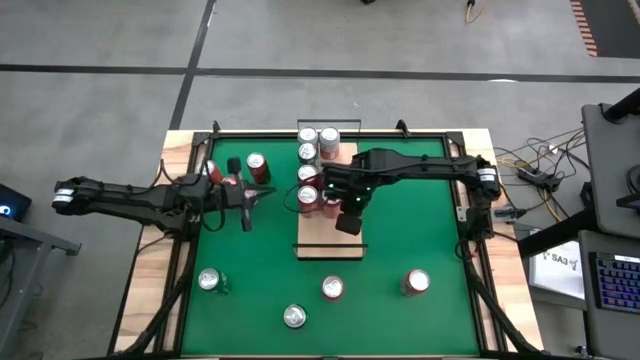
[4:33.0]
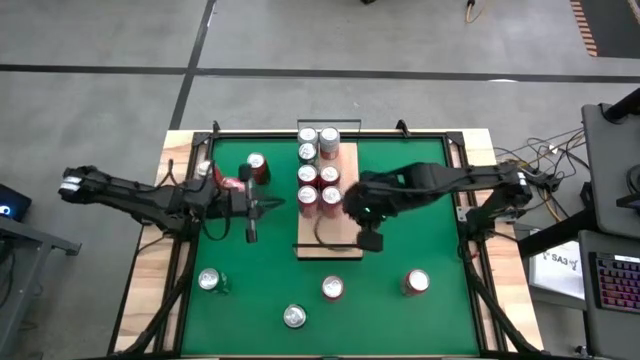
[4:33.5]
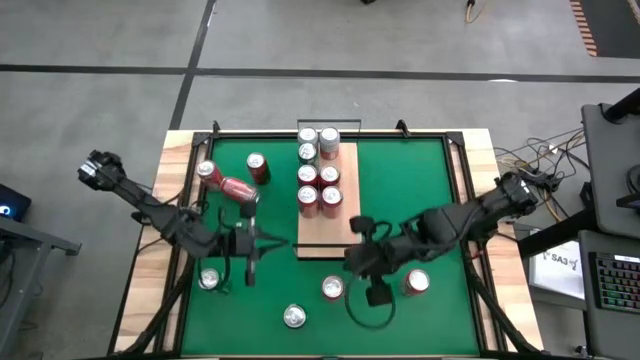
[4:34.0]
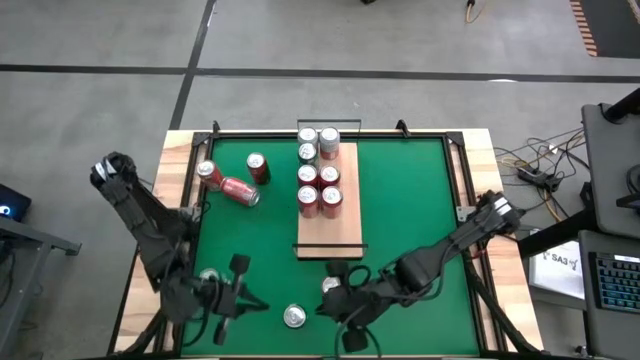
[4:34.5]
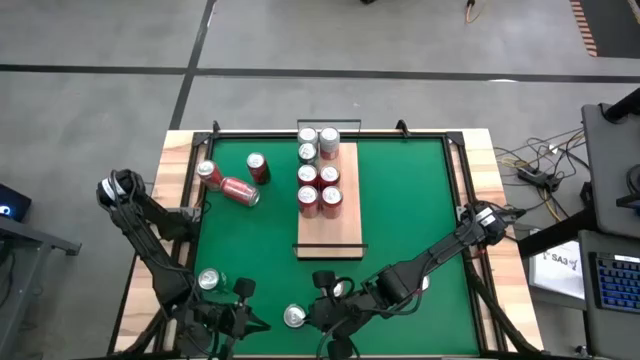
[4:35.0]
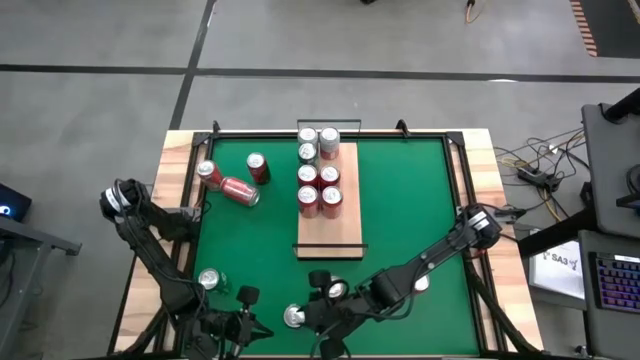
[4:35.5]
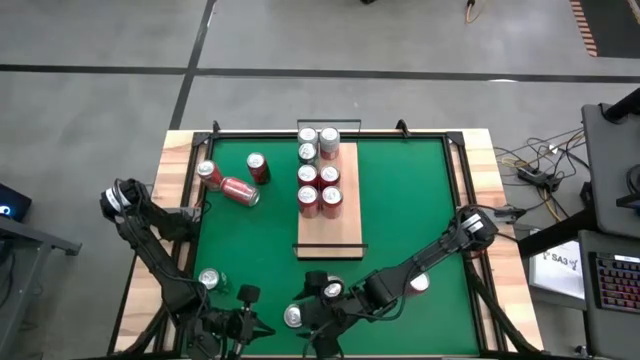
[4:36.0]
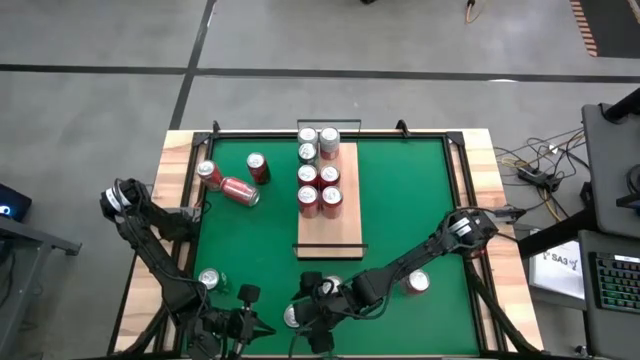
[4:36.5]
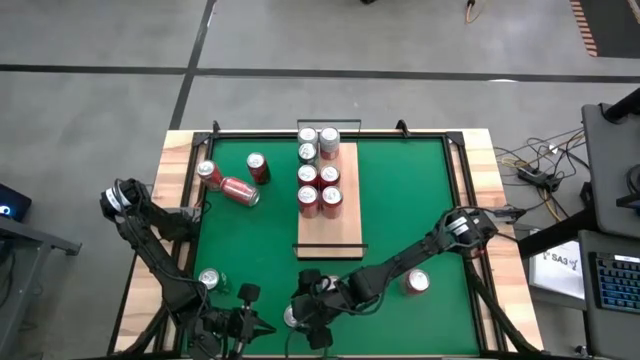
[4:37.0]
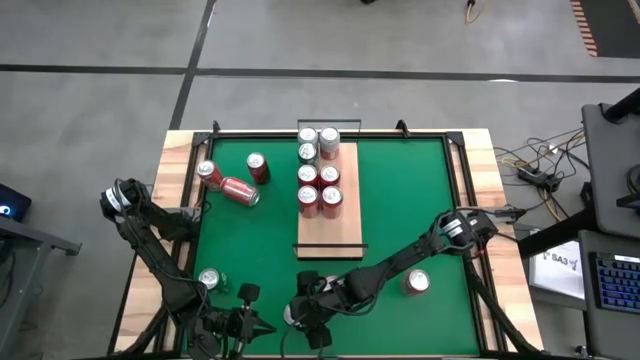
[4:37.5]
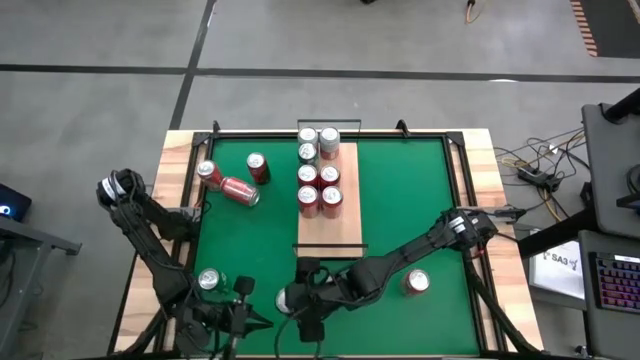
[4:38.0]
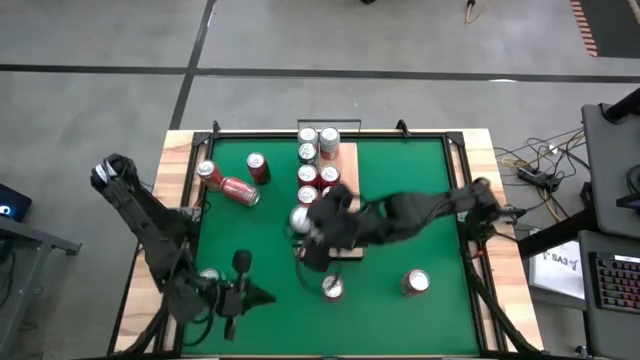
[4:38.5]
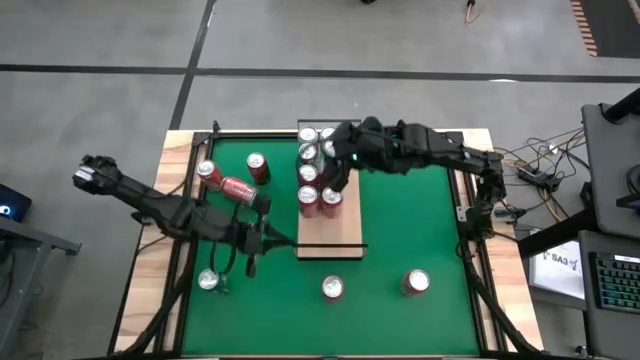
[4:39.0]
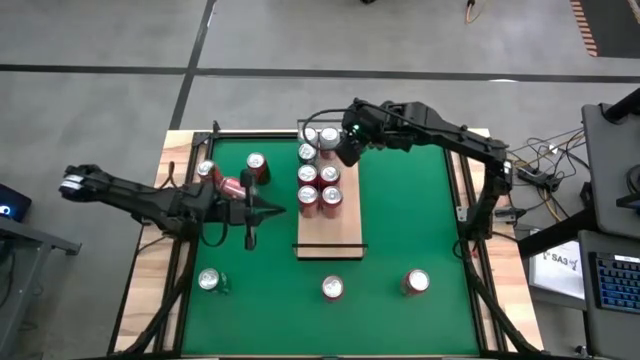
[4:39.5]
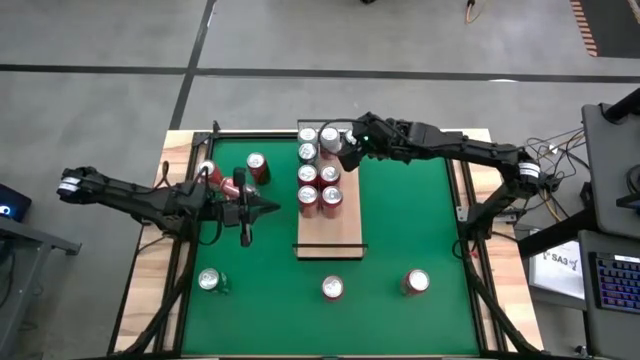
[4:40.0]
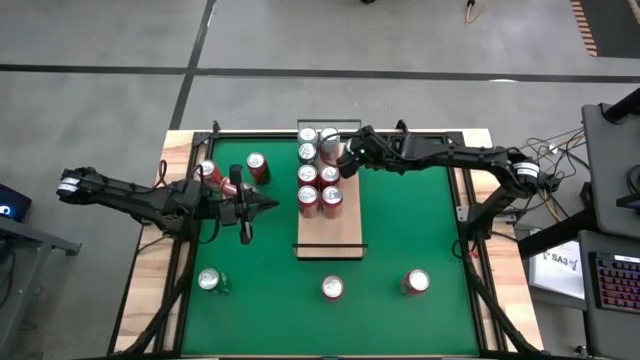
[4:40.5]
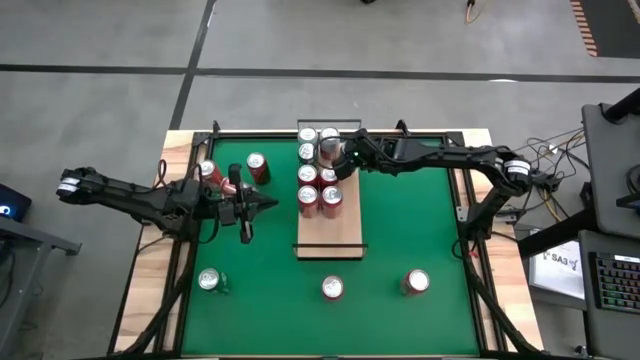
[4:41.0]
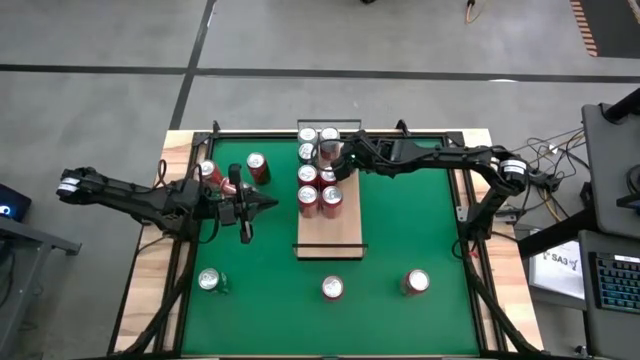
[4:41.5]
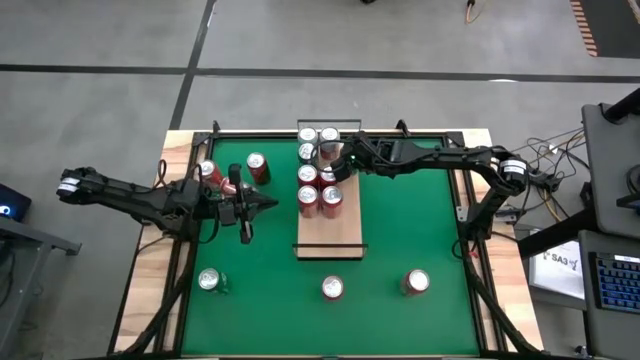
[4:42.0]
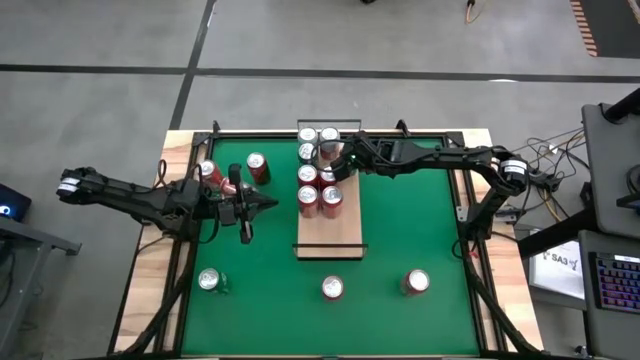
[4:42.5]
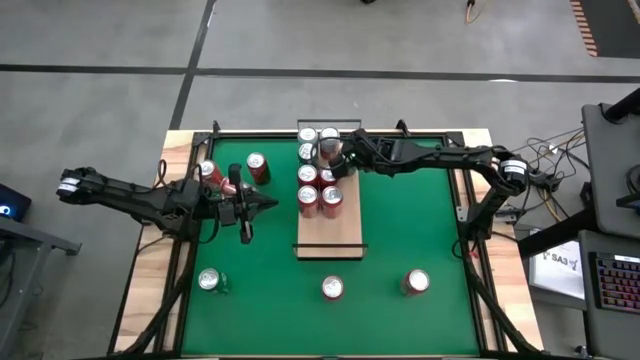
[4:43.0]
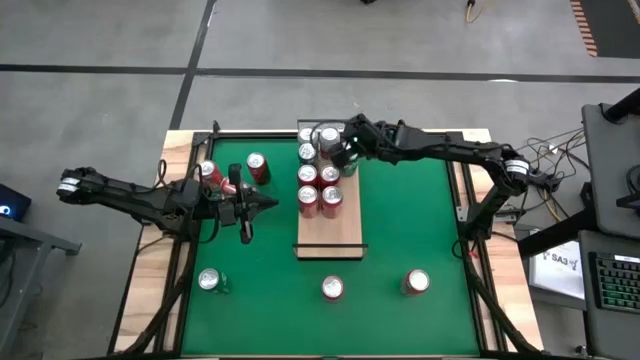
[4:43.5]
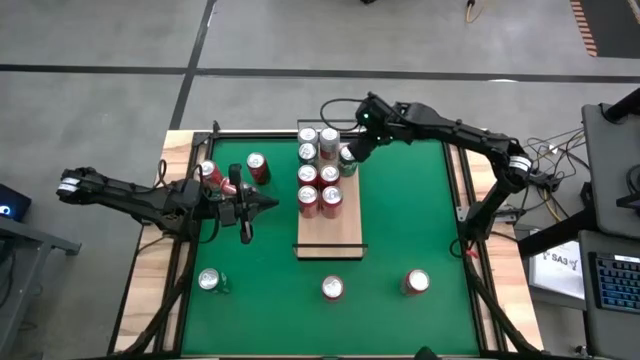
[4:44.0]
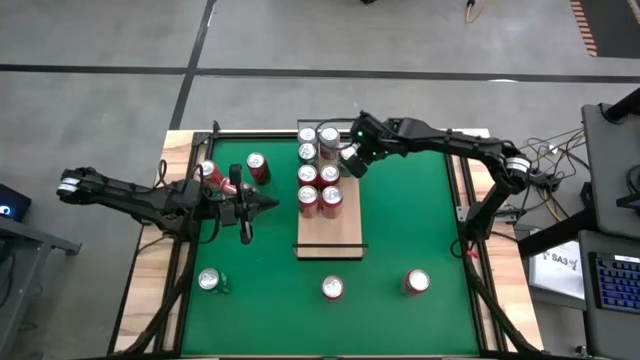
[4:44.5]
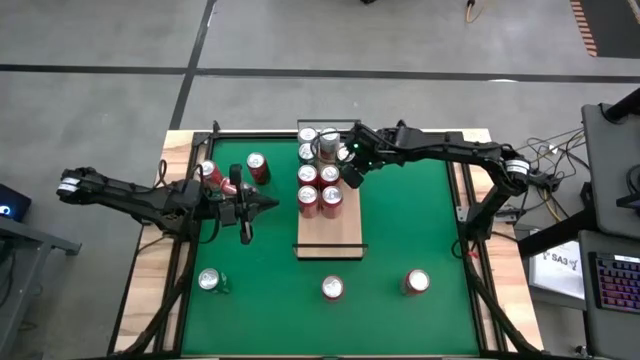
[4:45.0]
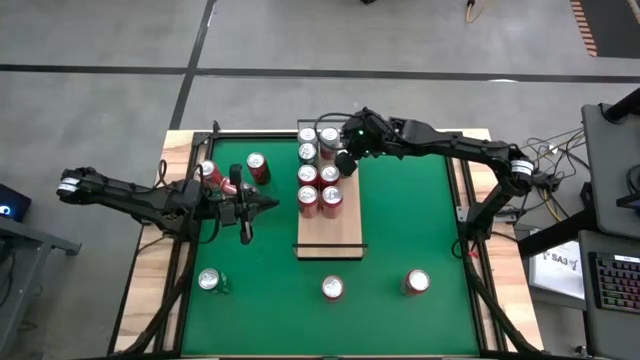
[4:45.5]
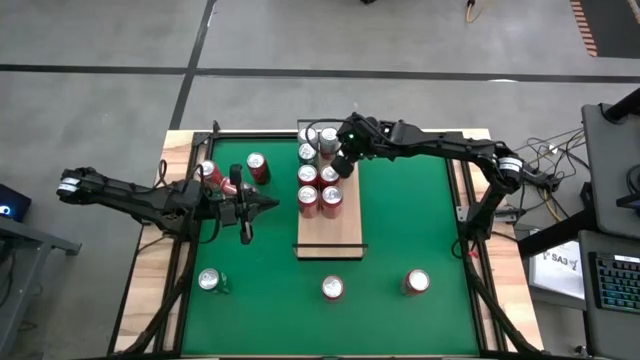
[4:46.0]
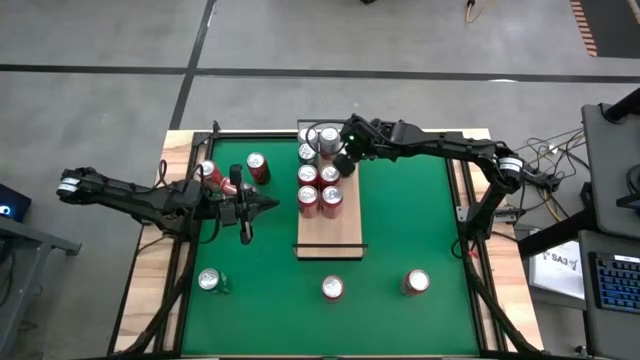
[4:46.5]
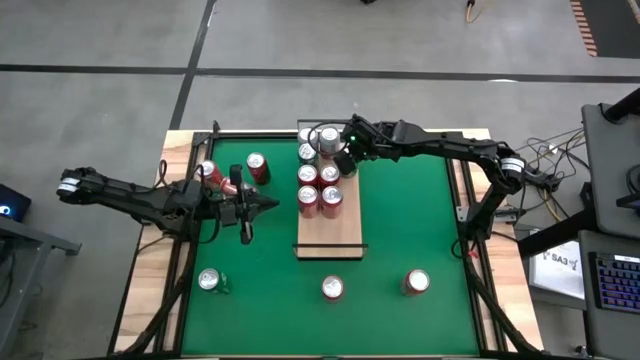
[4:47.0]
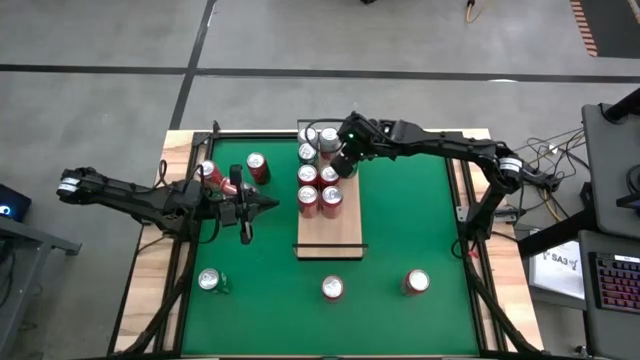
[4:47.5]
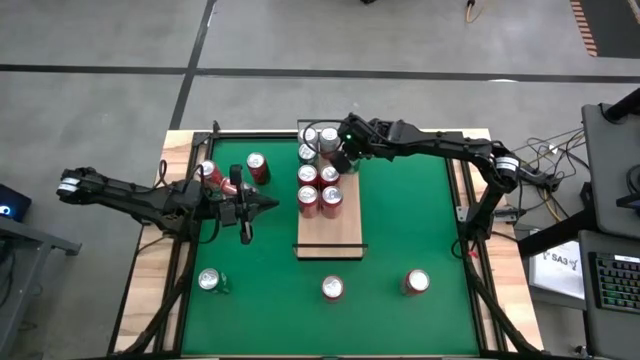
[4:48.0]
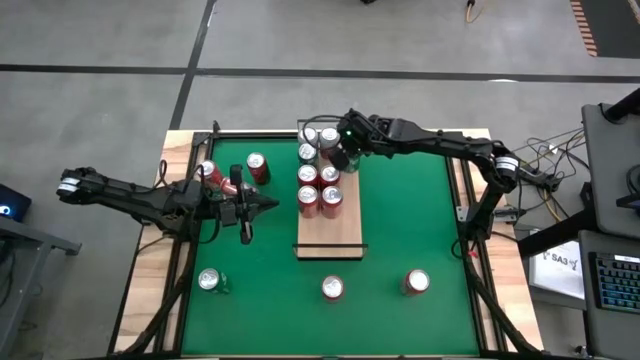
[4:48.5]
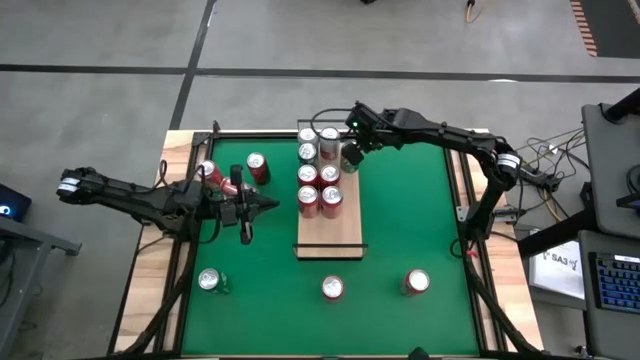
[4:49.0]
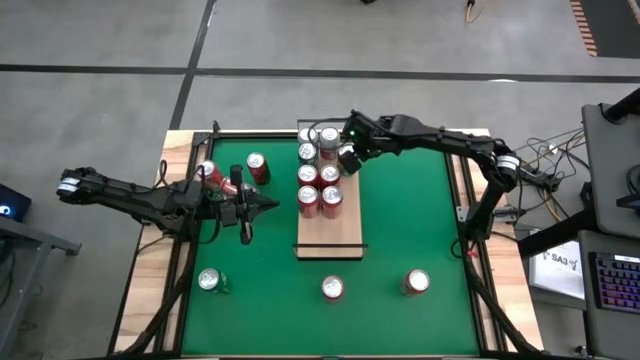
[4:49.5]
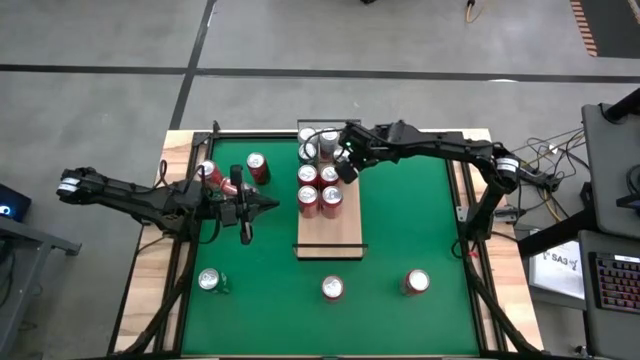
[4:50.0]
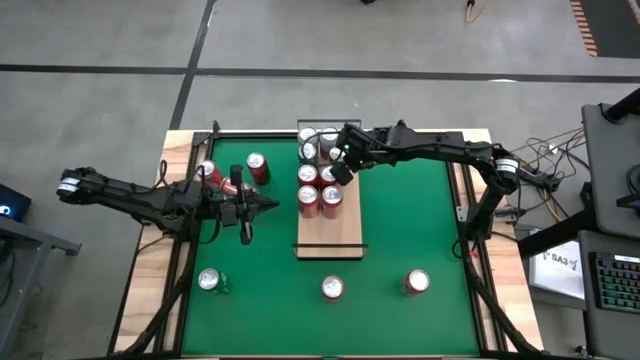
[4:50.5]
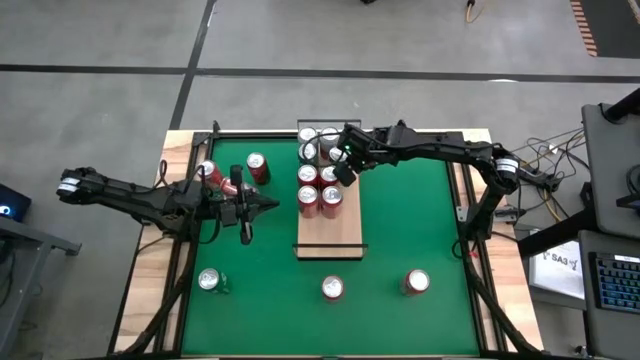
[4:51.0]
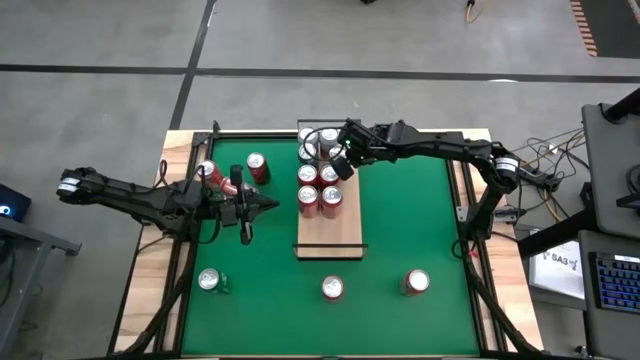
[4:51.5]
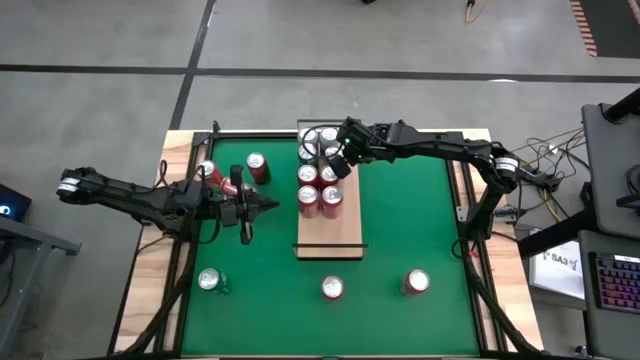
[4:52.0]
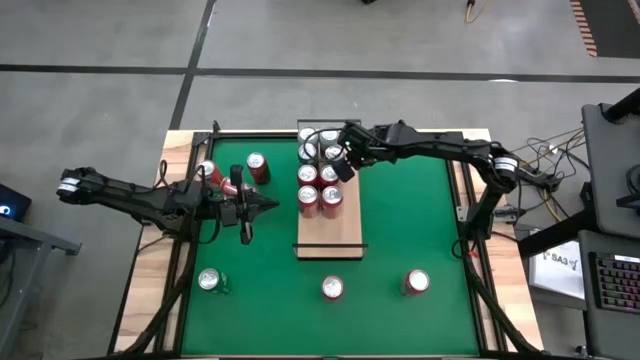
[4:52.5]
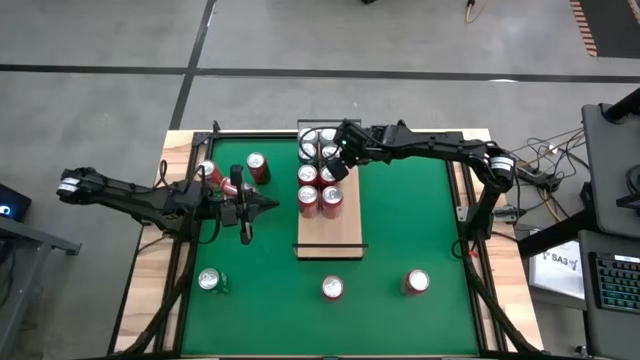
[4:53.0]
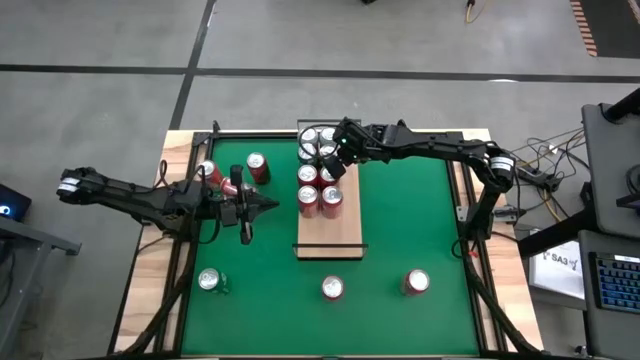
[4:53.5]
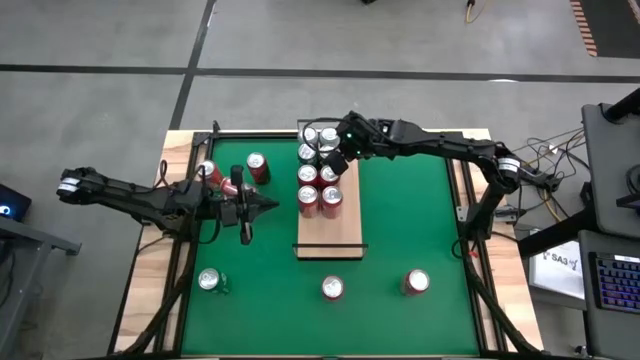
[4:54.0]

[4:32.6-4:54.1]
Task: Place canned beverage on shelf
Put the green soda can on the shelf and aligned with the other green soda can
